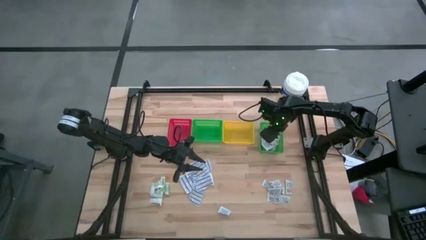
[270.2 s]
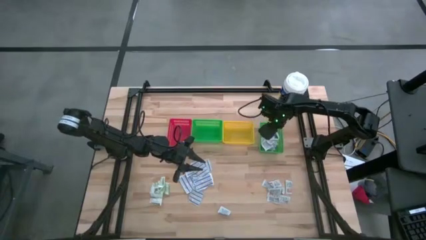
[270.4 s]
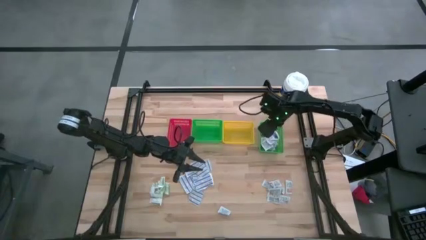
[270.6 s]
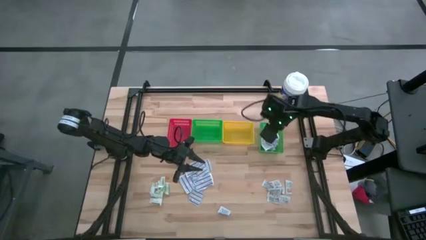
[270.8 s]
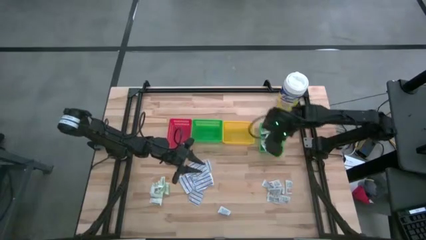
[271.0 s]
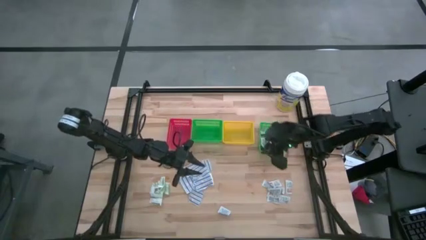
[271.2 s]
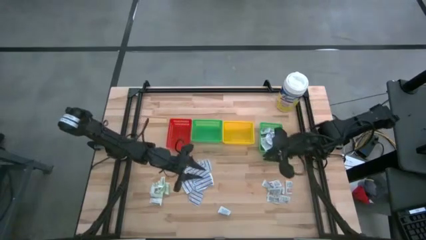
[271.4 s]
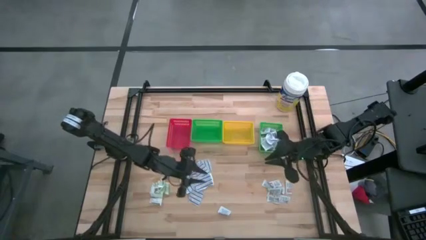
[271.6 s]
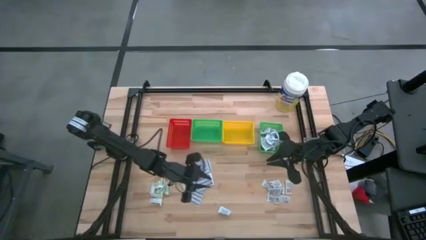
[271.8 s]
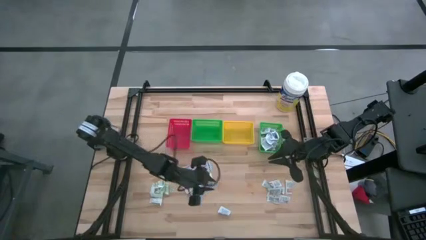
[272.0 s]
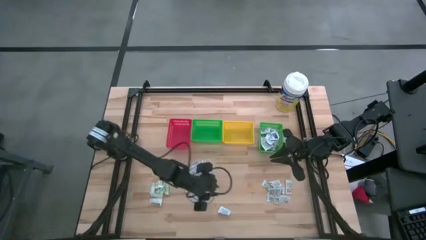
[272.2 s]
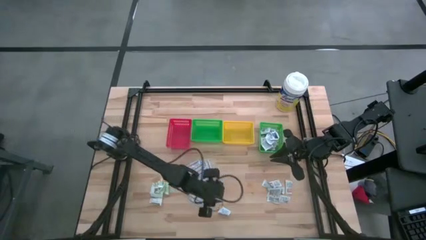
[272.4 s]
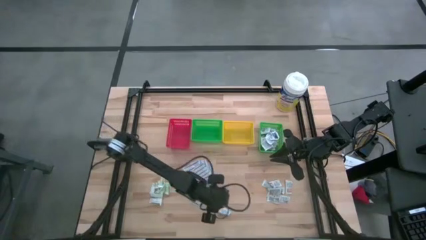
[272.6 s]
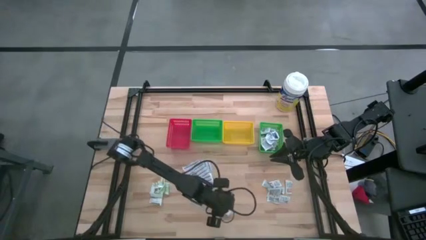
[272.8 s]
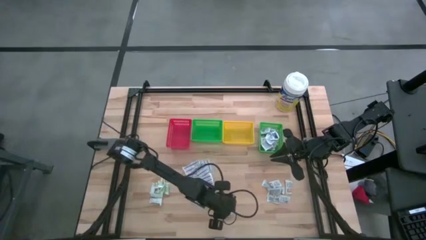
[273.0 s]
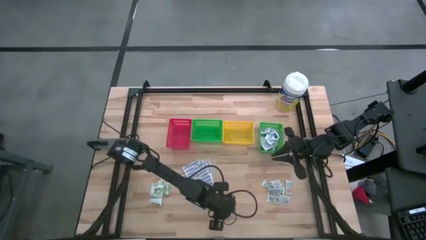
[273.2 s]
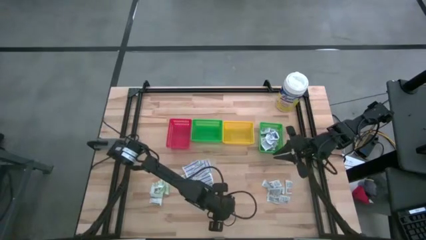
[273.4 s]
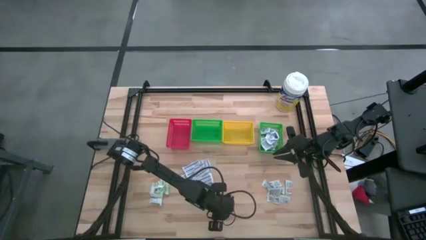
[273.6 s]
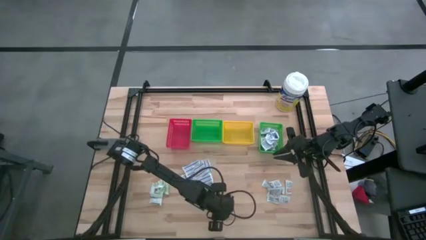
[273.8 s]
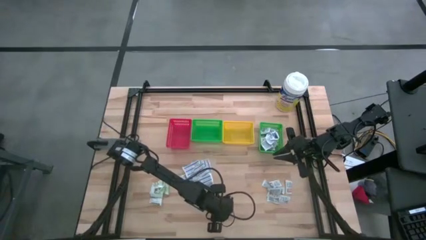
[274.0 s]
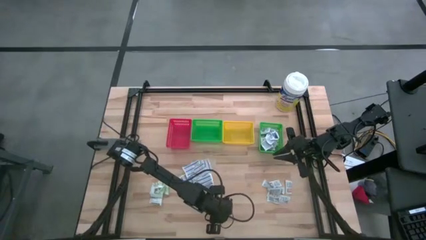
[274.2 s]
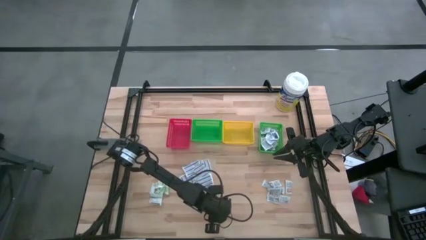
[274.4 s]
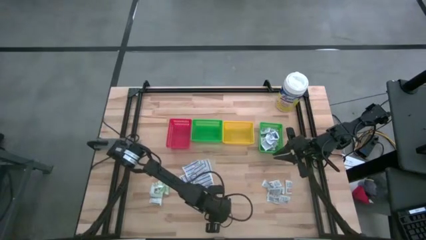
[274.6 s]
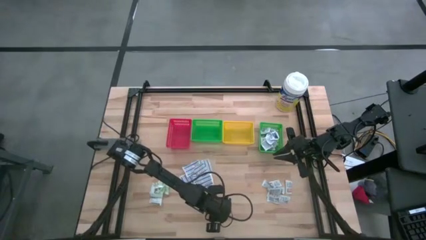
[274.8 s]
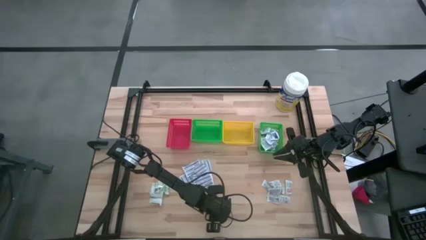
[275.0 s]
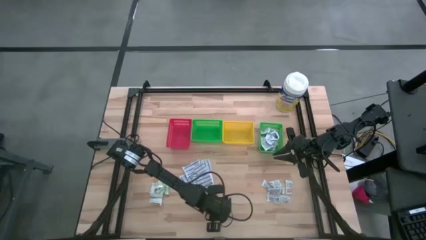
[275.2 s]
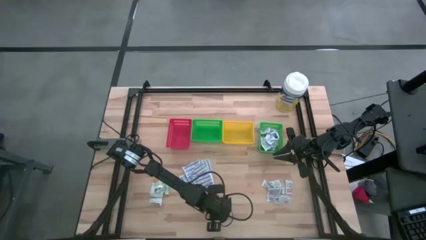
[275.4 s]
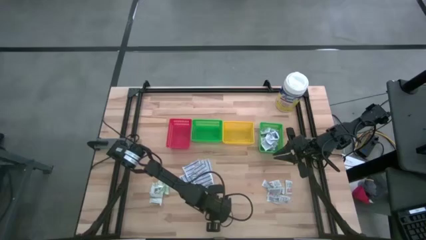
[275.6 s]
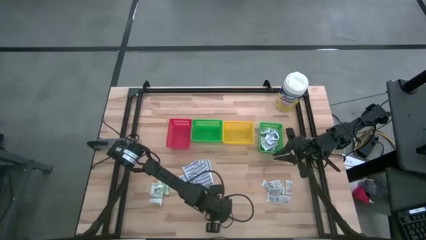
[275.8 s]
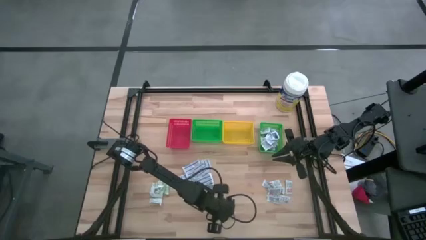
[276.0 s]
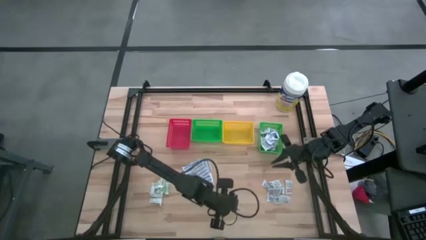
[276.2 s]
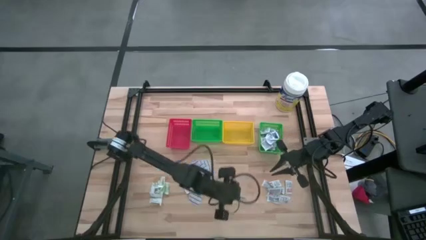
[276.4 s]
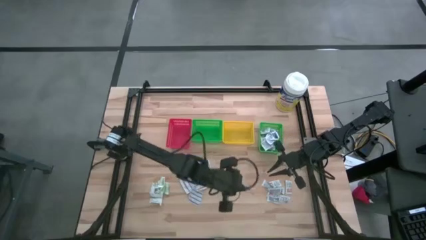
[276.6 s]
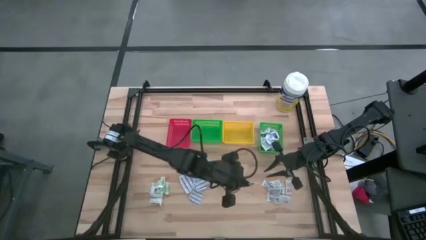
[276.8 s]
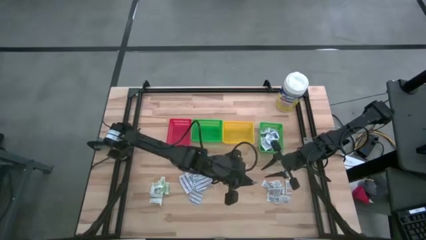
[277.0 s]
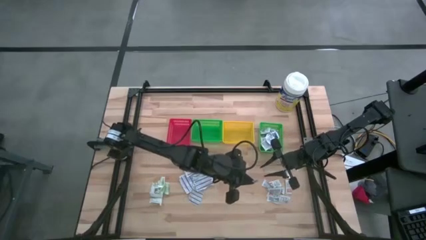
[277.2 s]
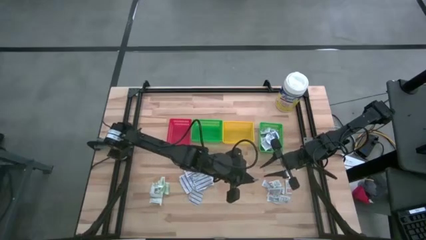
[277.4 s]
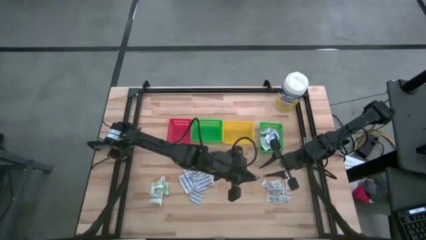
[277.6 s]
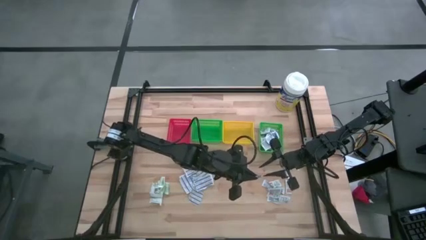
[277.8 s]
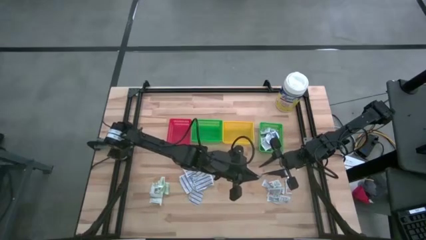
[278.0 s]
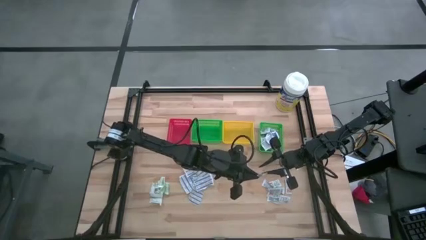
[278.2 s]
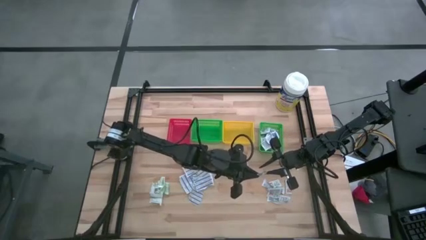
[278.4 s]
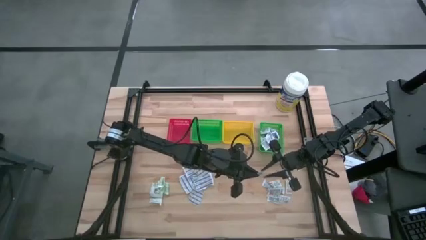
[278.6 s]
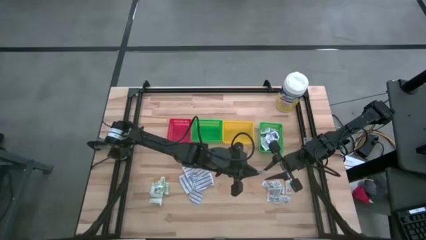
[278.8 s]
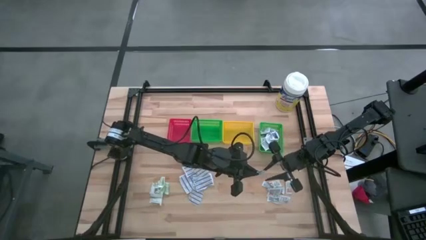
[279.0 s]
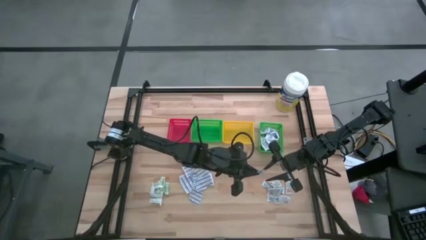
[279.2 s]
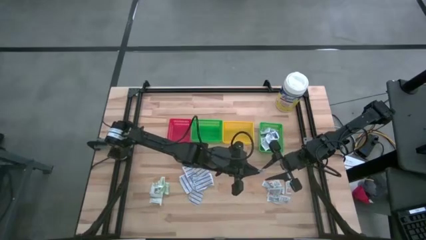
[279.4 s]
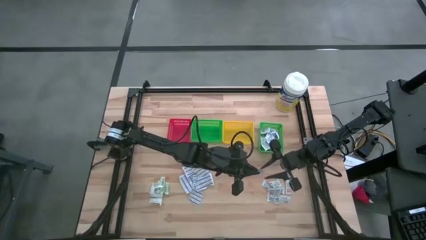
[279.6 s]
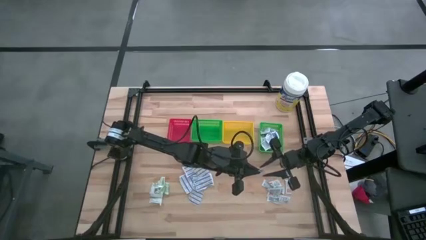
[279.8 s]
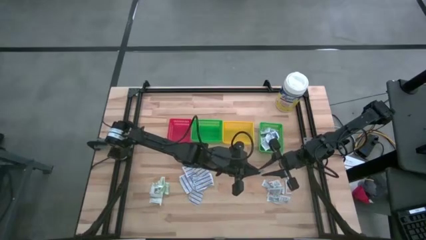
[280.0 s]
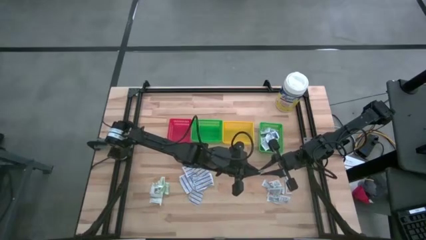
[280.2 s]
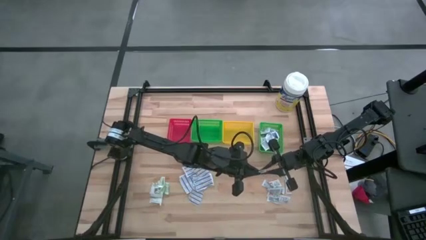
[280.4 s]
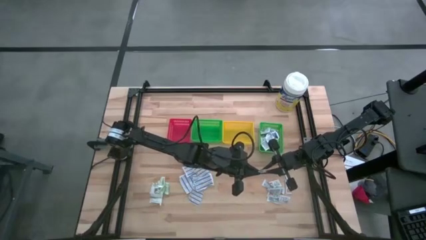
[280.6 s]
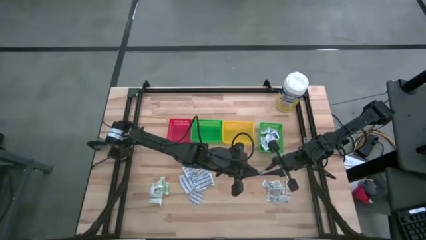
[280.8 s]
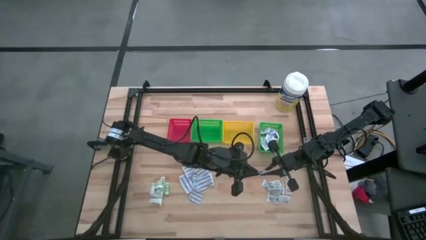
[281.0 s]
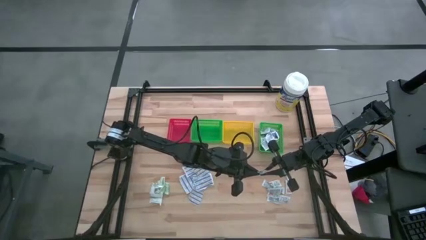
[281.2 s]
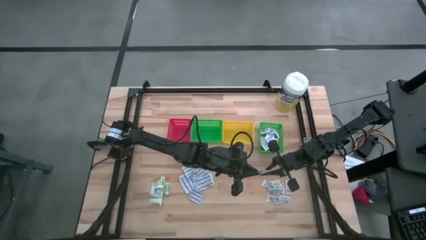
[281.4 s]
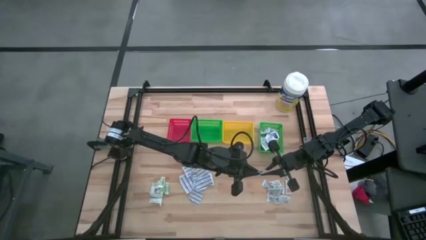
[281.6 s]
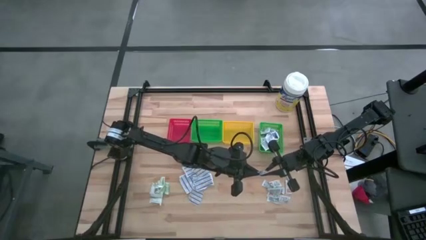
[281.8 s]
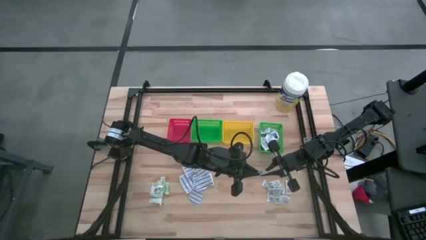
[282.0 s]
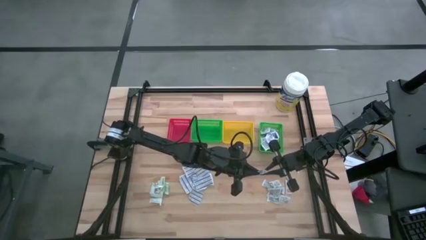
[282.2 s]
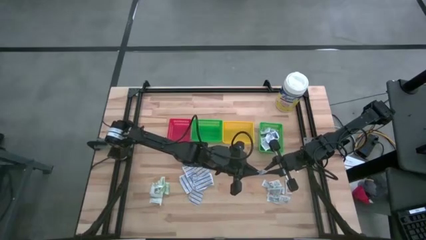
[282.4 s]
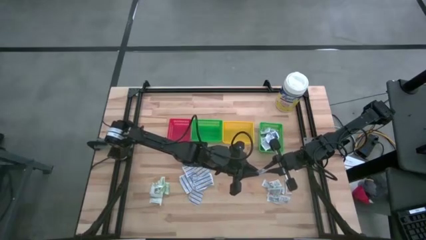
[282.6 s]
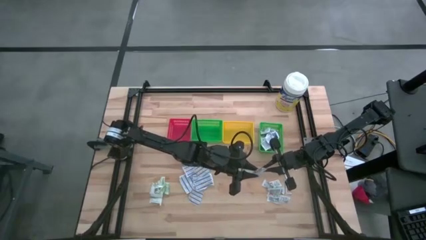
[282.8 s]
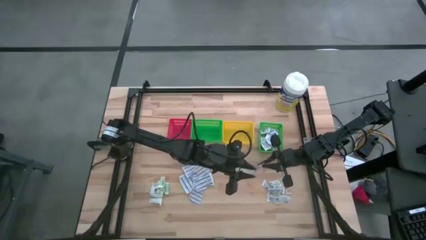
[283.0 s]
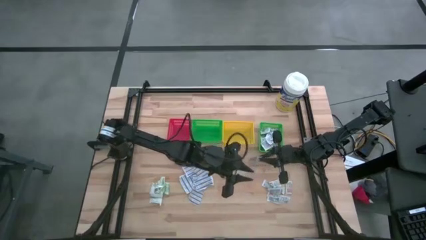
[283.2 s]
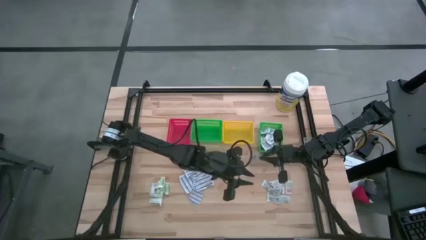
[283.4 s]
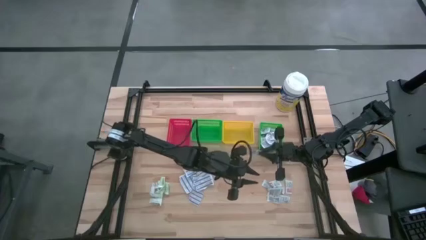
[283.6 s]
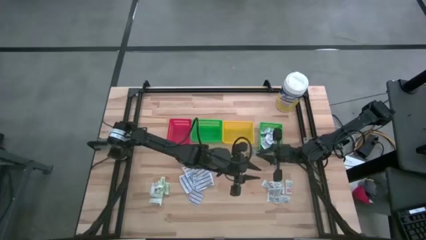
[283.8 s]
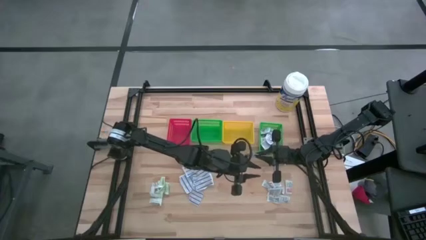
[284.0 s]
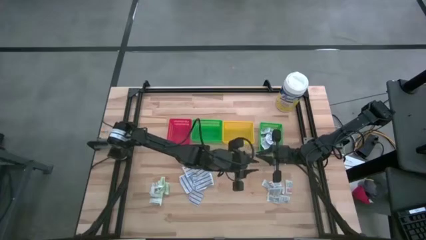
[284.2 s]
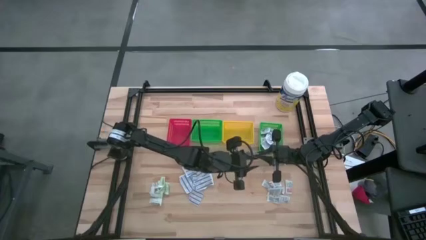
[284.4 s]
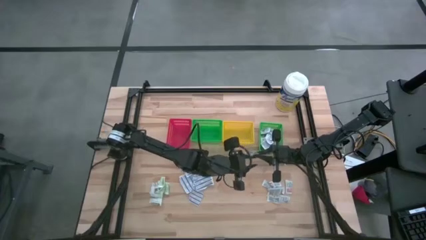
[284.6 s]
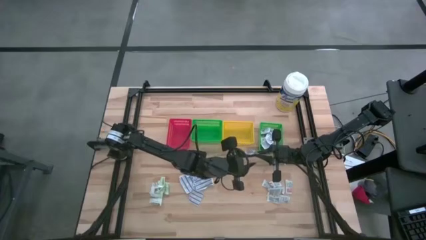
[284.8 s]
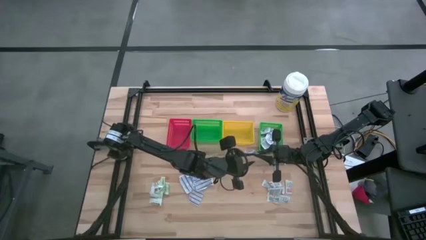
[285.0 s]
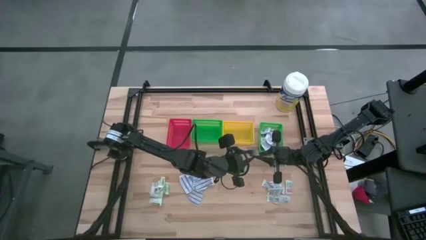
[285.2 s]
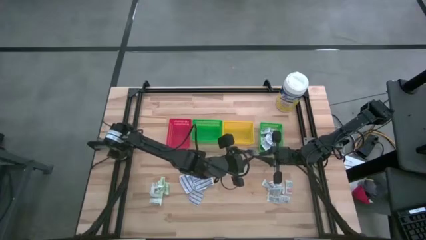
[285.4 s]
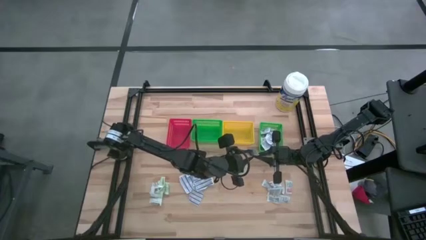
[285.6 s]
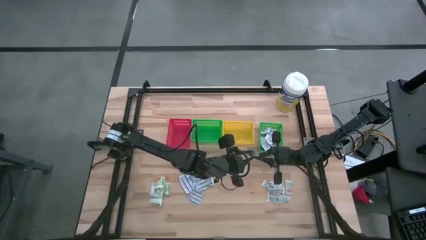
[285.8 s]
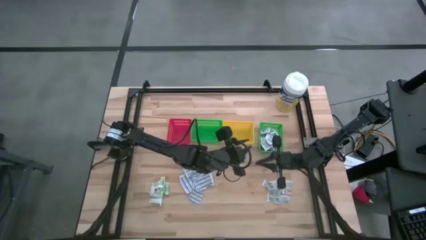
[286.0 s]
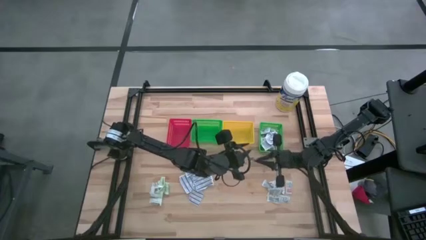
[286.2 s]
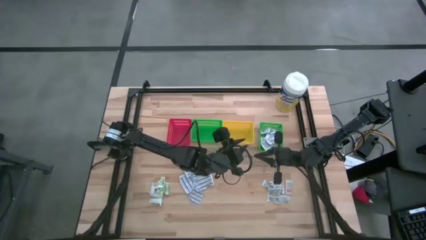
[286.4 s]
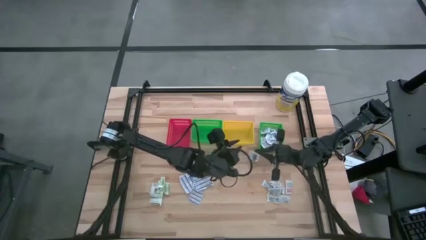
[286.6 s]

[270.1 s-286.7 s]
Task: Pick & Place First Aid Supplies
Put the blue alcohol pad into the right green bin

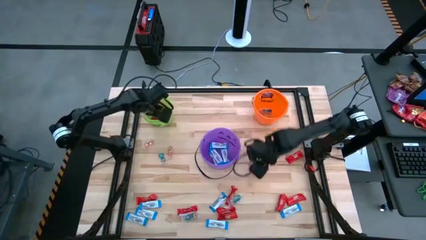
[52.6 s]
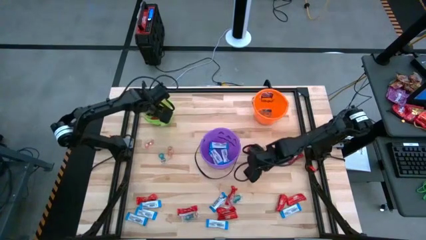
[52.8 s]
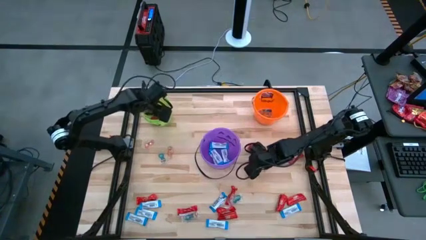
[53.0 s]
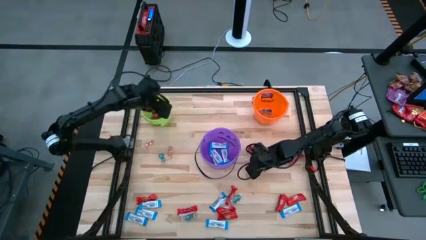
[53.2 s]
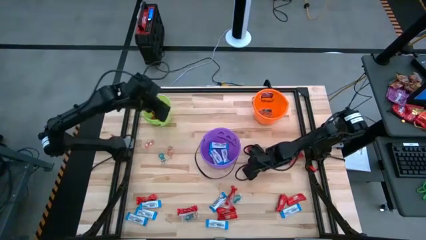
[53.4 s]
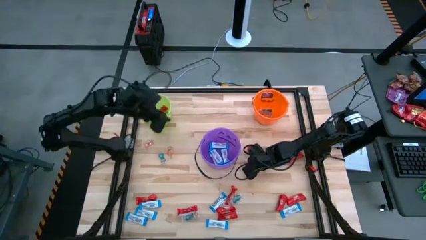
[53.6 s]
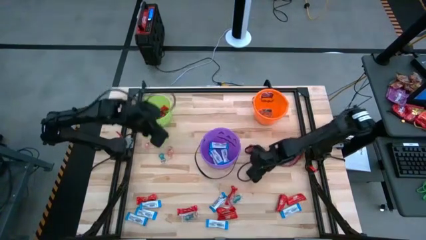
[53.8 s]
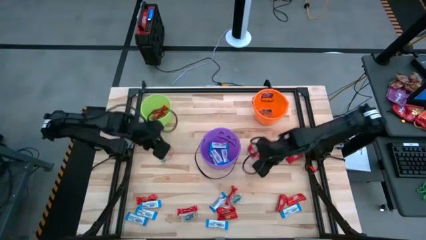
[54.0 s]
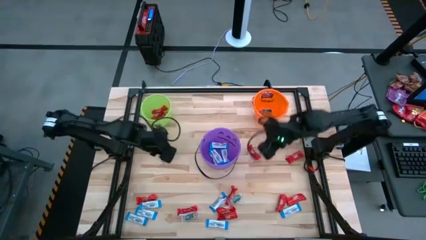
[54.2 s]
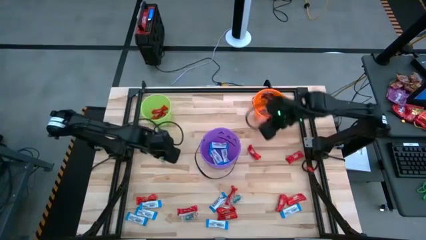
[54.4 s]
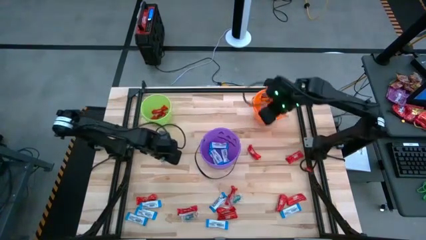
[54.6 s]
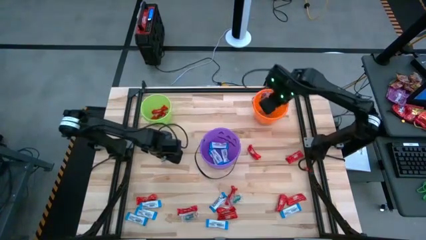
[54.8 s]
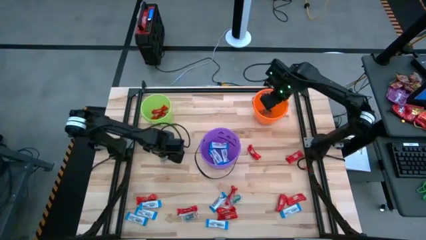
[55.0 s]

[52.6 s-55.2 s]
Task: Sort candy by brand, put in halloween buckets
Put the red gummy into the orange bucket
